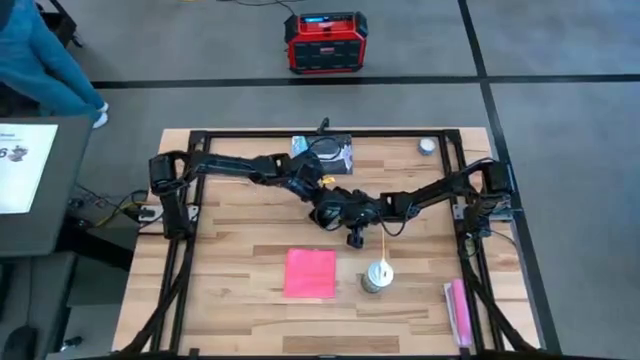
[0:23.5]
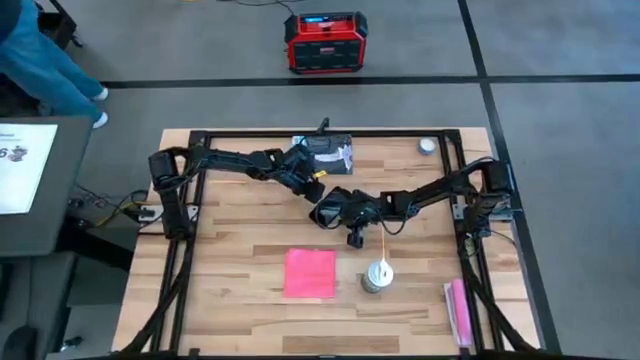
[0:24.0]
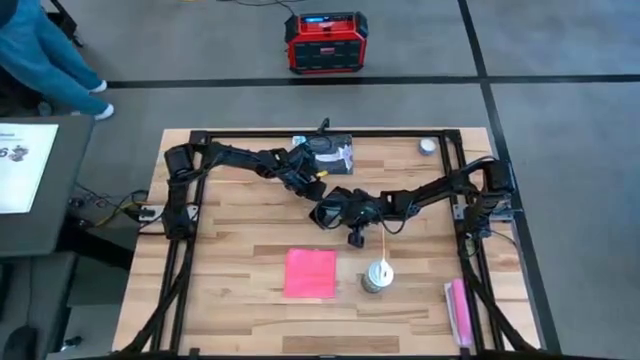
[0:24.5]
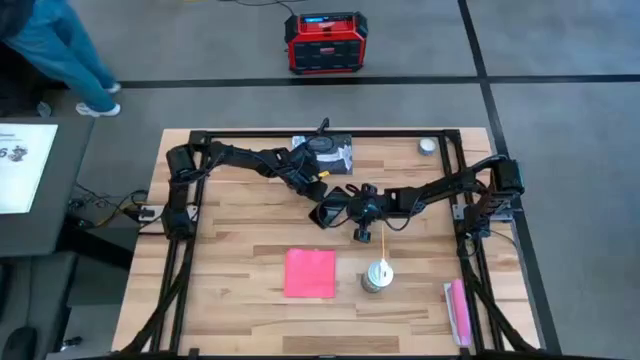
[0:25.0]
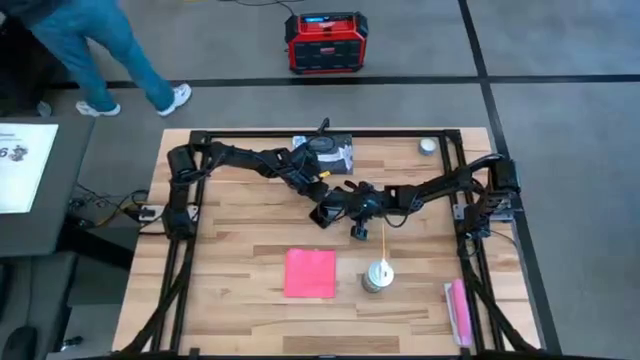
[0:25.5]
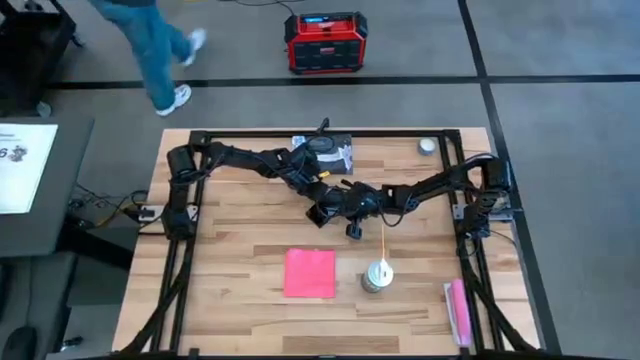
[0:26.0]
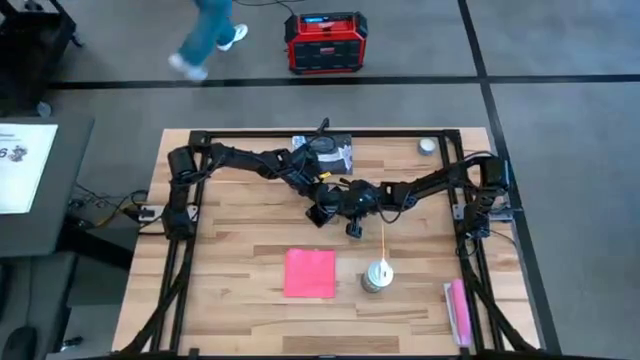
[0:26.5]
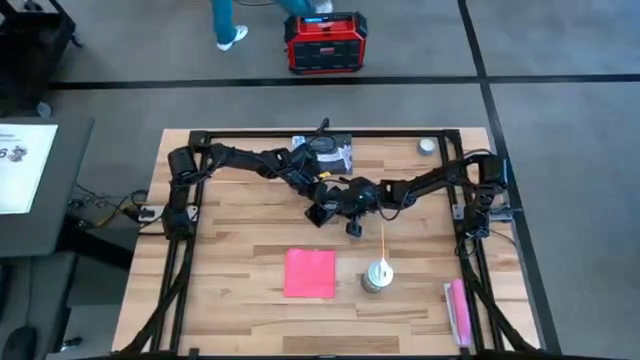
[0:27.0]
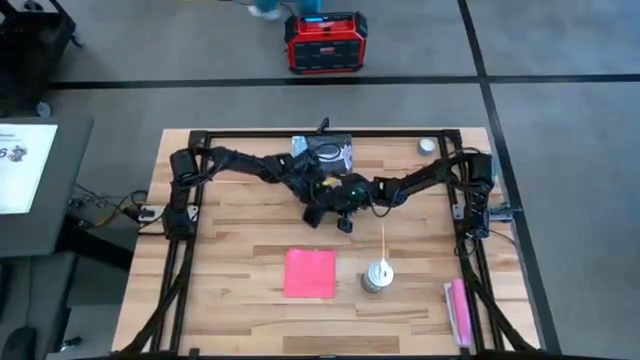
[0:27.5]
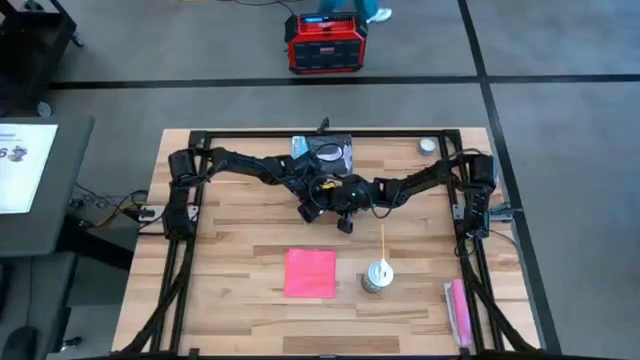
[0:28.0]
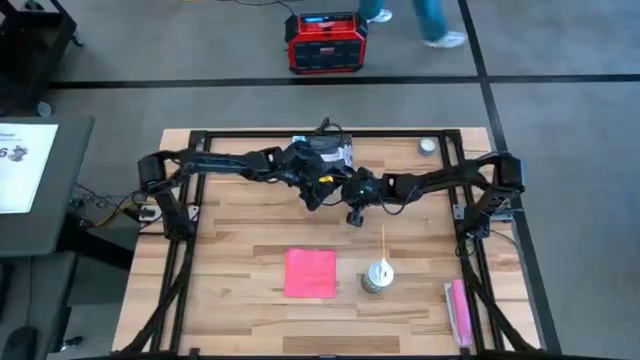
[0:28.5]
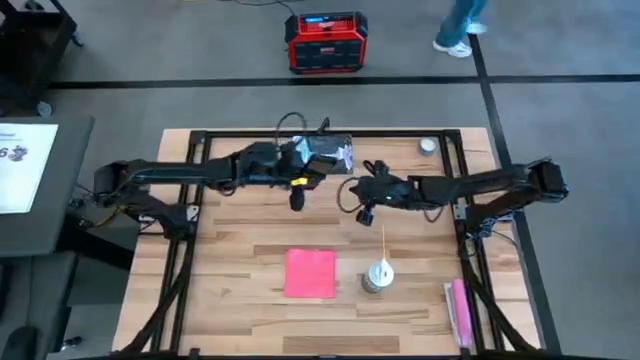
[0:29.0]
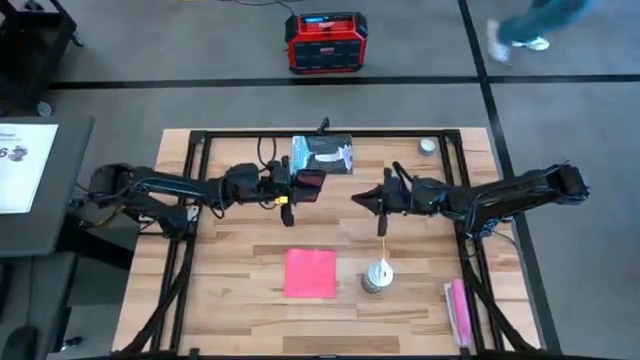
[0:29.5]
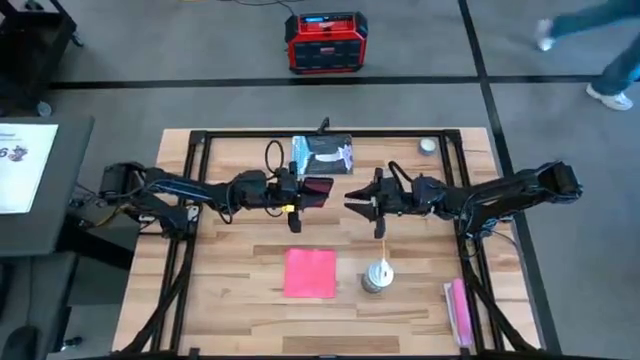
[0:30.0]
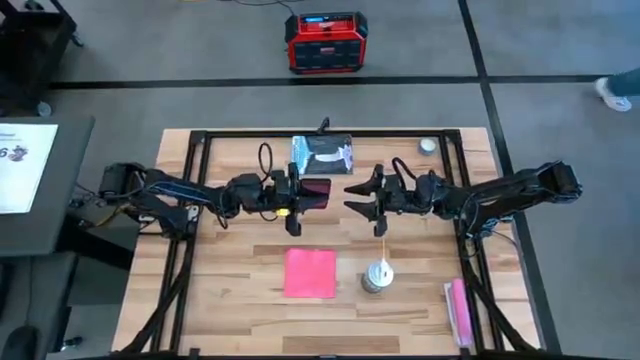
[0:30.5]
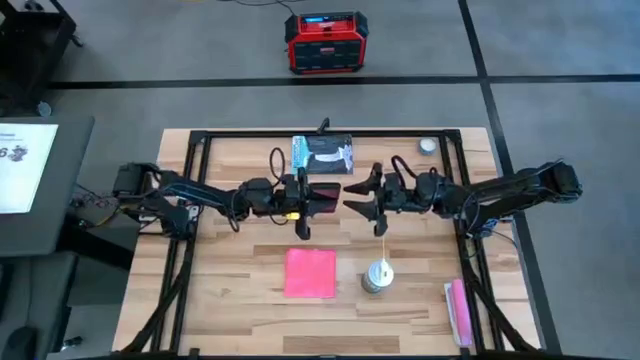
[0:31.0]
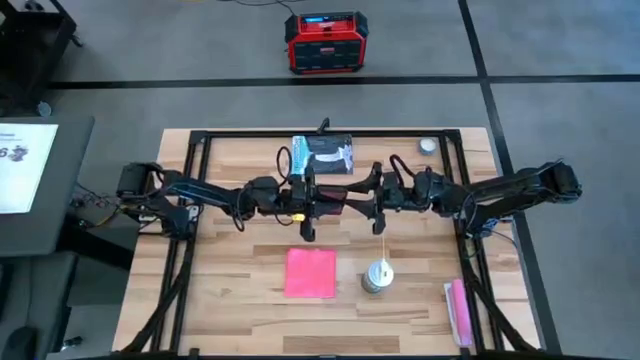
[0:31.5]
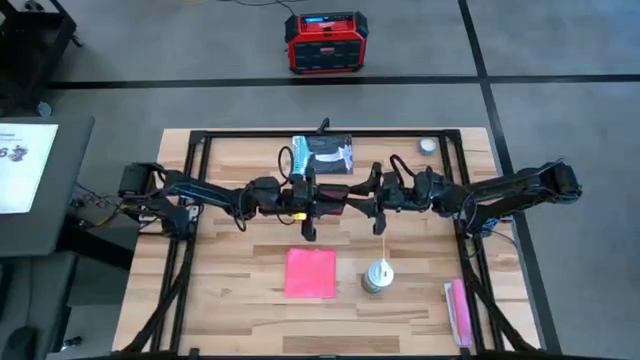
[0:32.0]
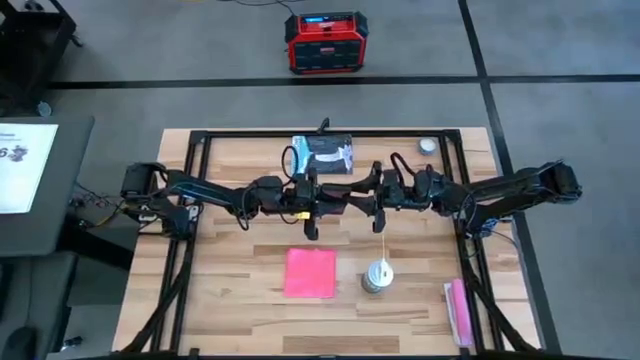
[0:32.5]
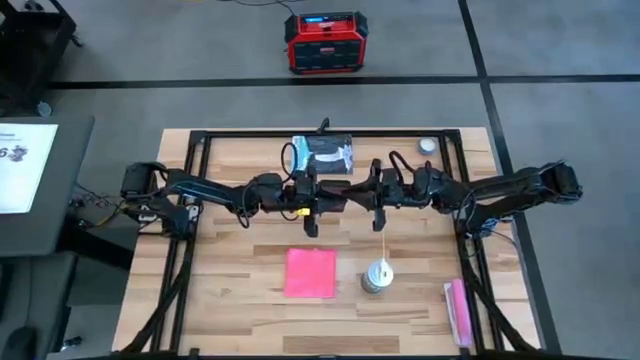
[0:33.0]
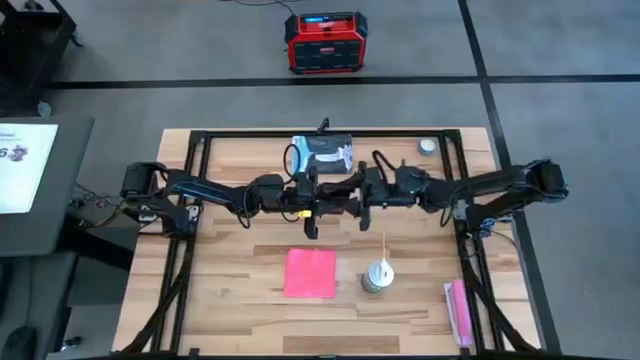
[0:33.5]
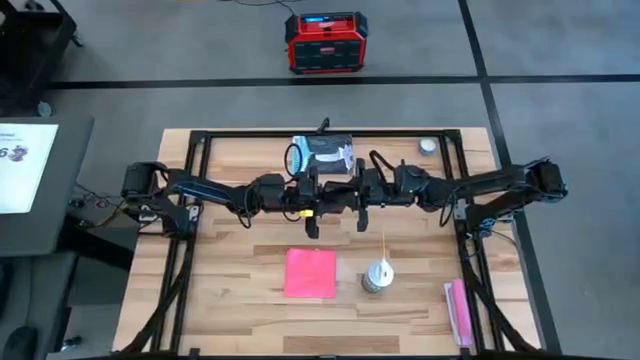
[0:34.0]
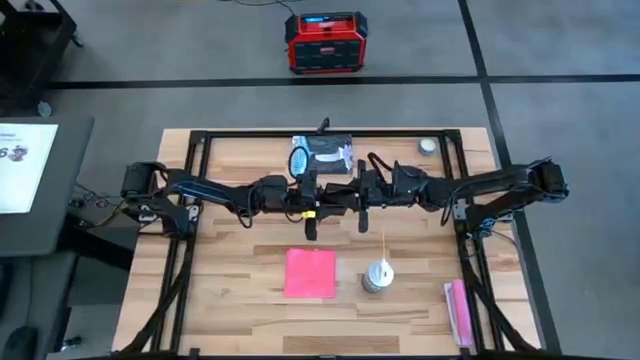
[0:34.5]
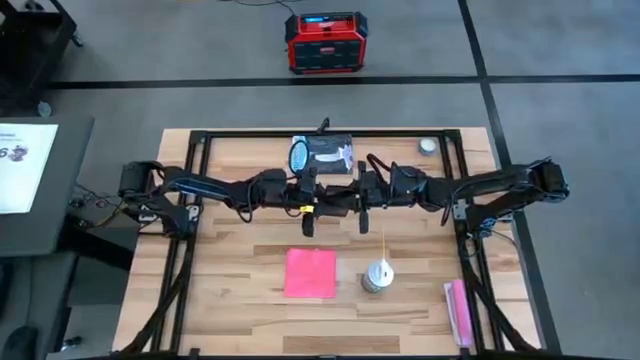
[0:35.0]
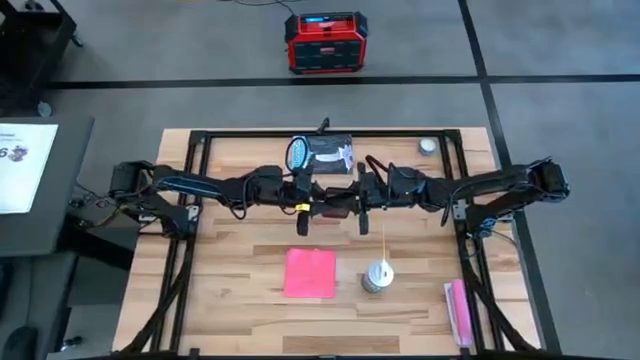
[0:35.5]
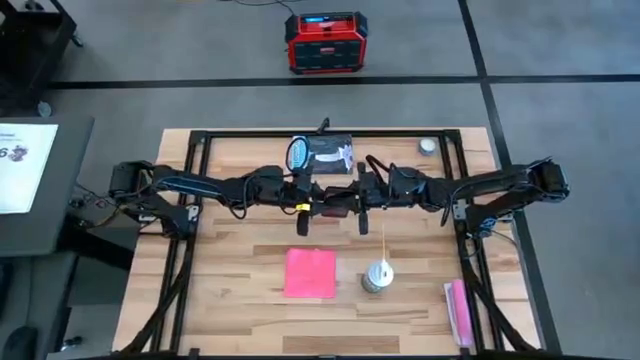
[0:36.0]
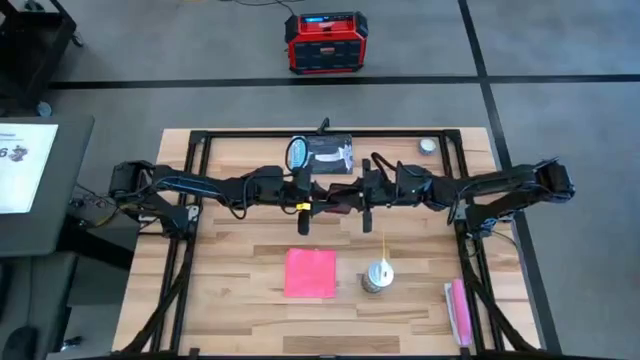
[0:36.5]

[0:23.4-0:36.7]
Task: Apply microfiber cloth
Spray the front of the cellphone using the spray bottle
